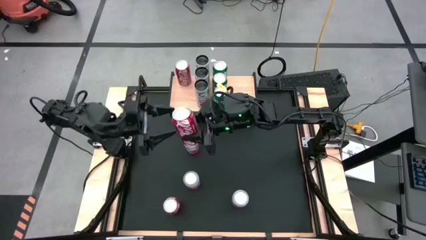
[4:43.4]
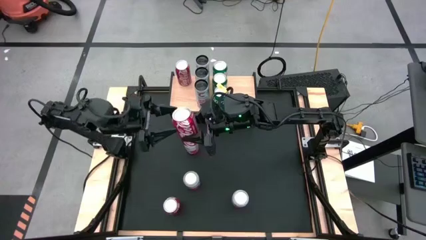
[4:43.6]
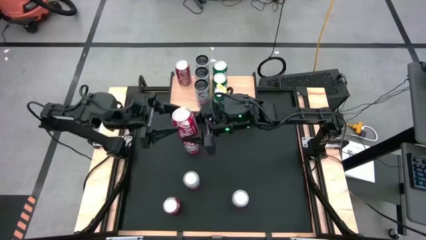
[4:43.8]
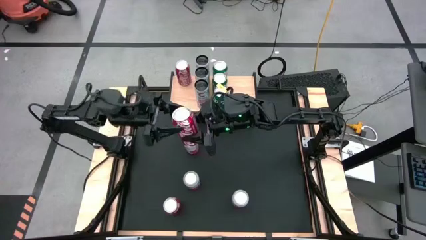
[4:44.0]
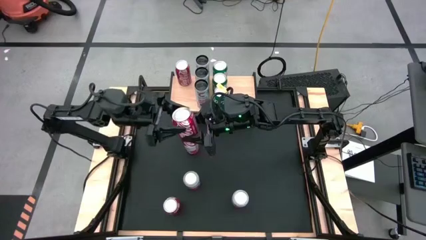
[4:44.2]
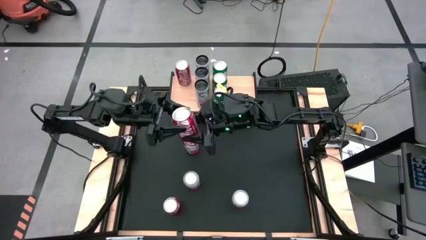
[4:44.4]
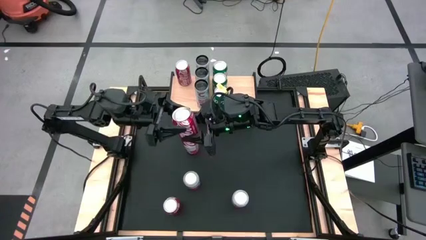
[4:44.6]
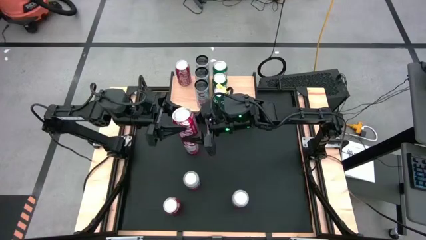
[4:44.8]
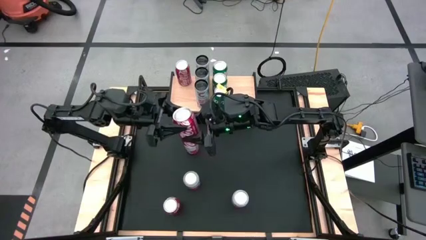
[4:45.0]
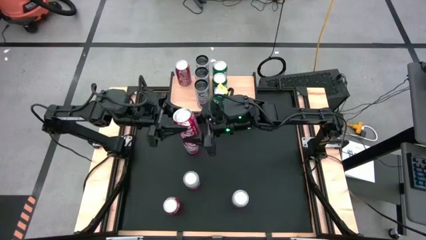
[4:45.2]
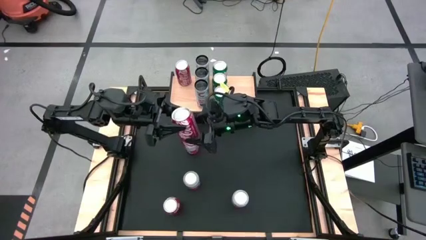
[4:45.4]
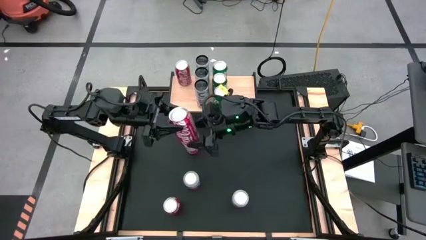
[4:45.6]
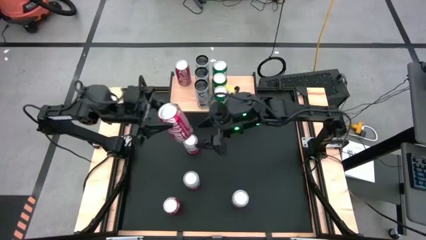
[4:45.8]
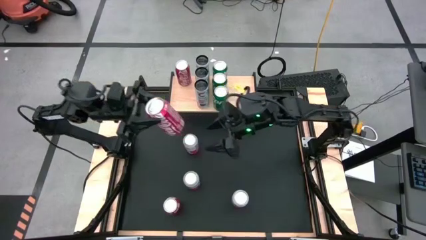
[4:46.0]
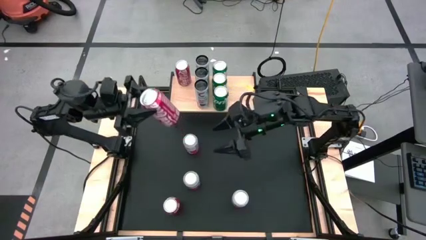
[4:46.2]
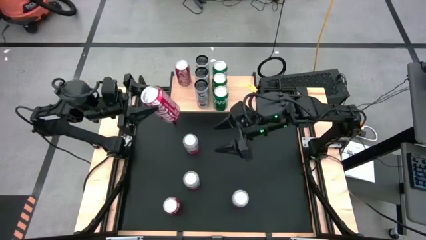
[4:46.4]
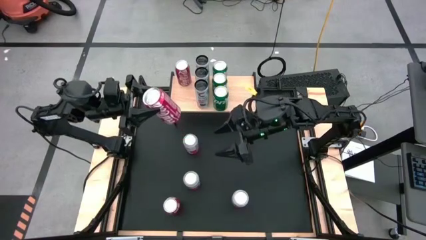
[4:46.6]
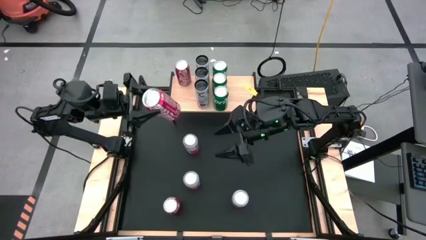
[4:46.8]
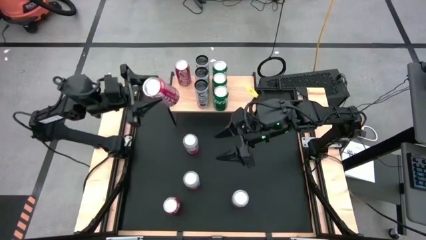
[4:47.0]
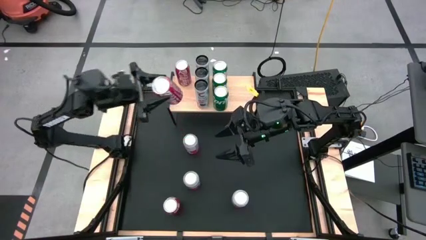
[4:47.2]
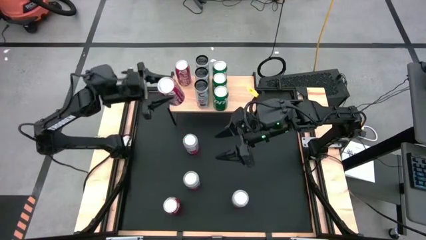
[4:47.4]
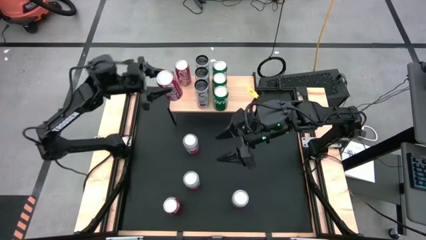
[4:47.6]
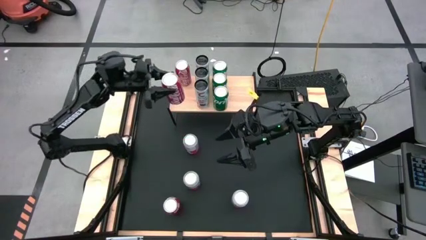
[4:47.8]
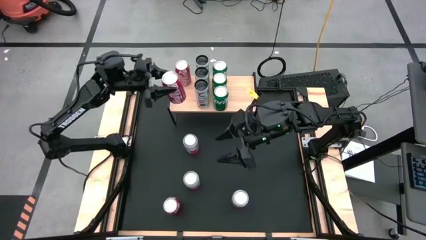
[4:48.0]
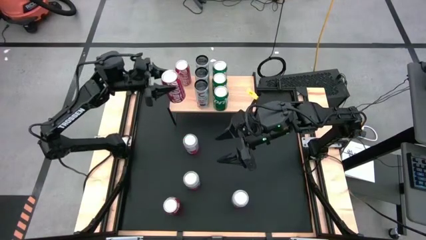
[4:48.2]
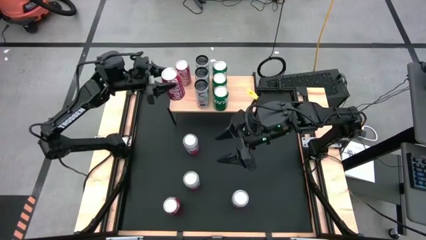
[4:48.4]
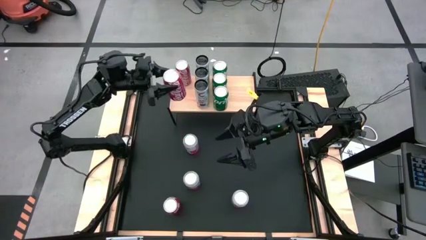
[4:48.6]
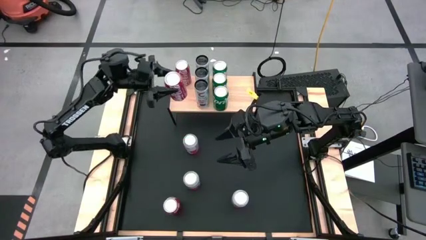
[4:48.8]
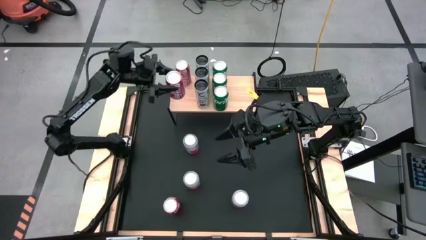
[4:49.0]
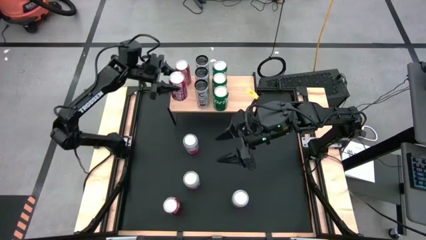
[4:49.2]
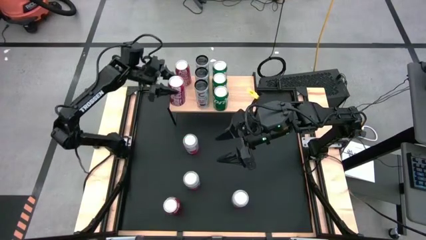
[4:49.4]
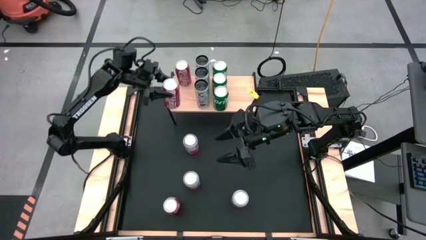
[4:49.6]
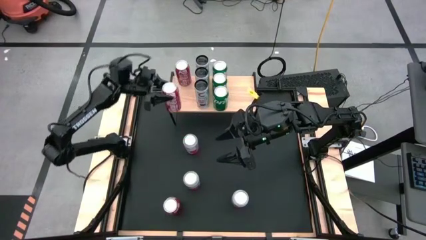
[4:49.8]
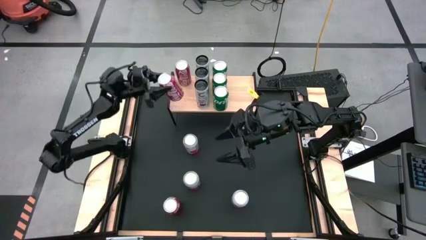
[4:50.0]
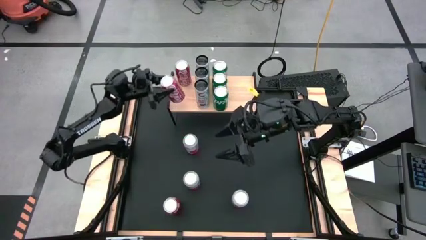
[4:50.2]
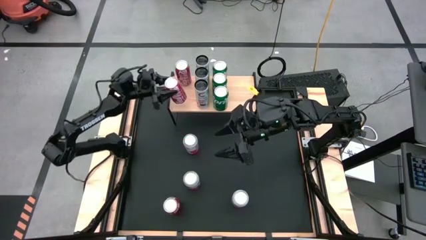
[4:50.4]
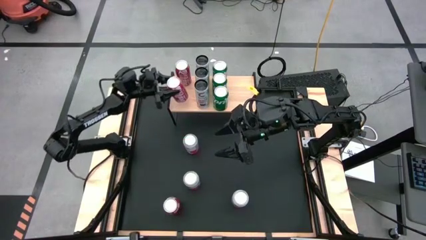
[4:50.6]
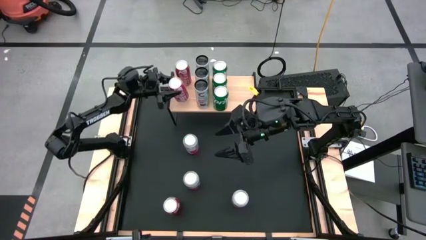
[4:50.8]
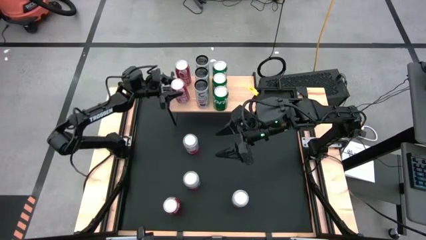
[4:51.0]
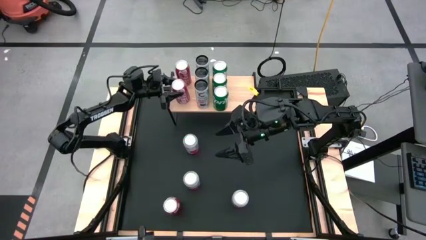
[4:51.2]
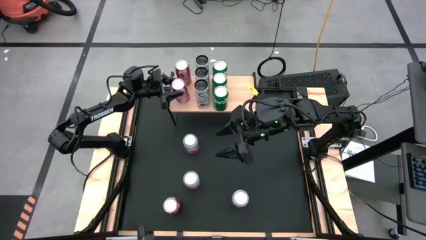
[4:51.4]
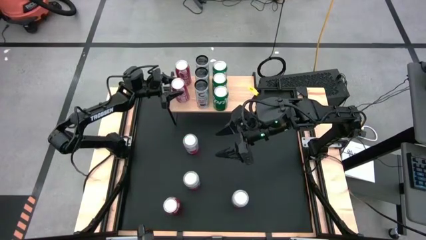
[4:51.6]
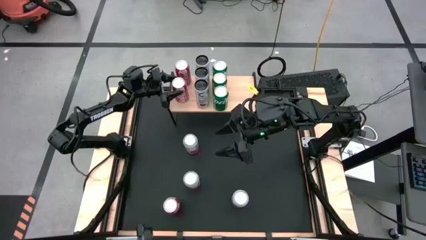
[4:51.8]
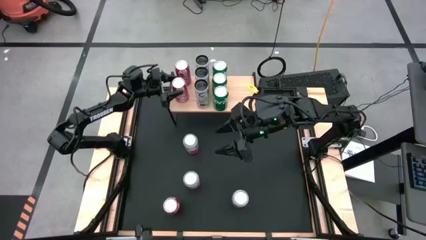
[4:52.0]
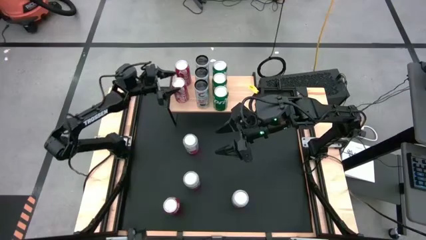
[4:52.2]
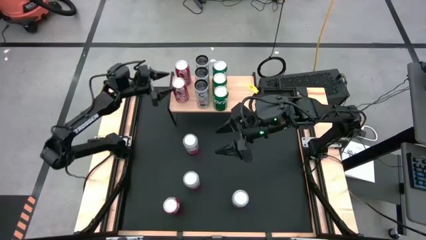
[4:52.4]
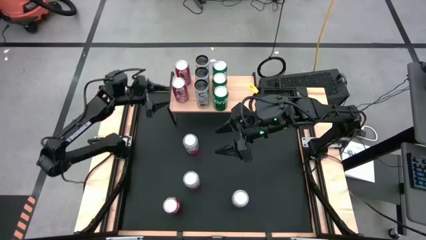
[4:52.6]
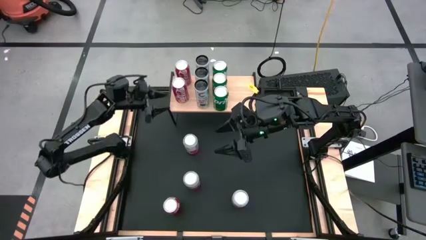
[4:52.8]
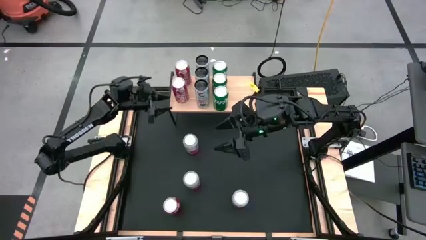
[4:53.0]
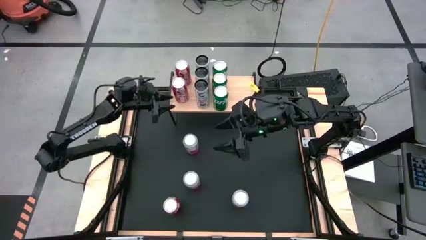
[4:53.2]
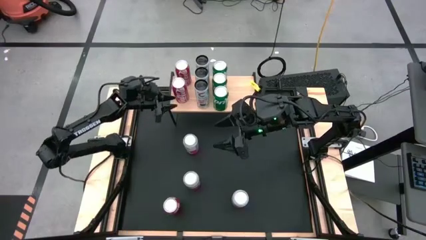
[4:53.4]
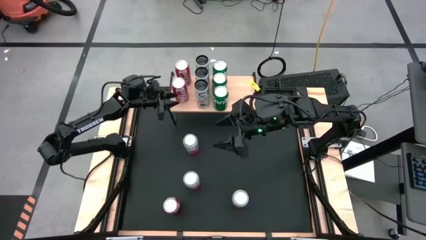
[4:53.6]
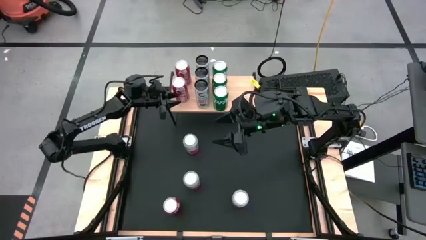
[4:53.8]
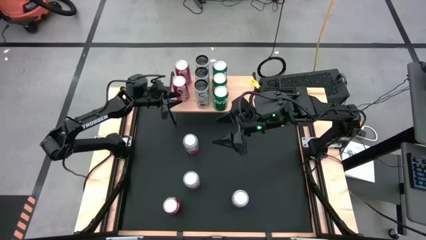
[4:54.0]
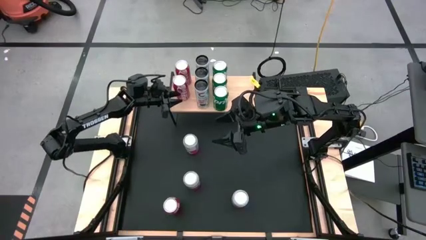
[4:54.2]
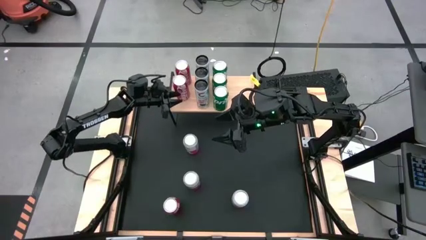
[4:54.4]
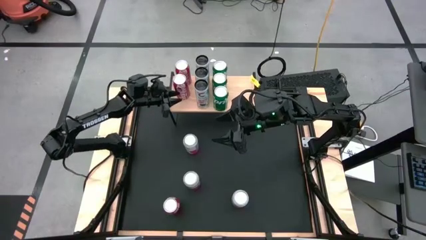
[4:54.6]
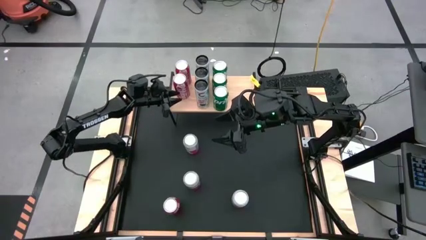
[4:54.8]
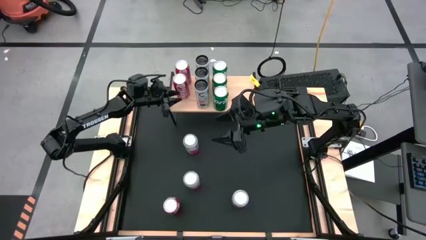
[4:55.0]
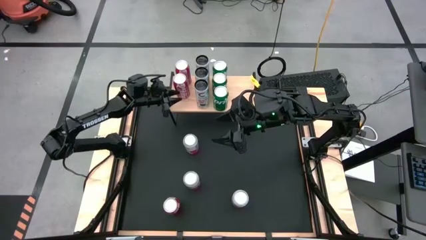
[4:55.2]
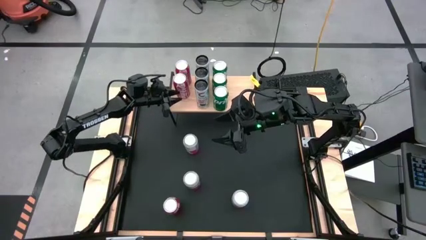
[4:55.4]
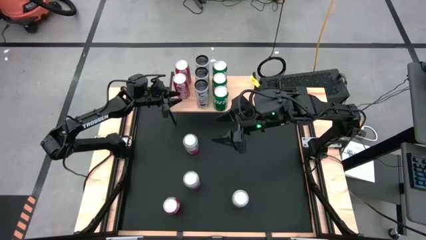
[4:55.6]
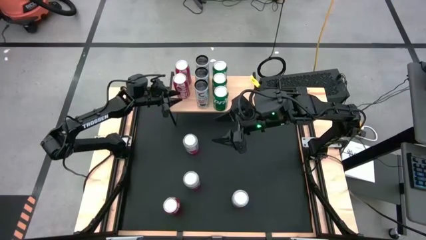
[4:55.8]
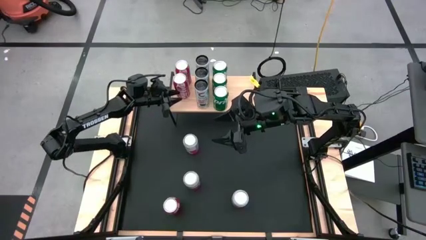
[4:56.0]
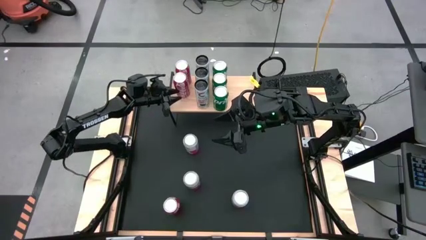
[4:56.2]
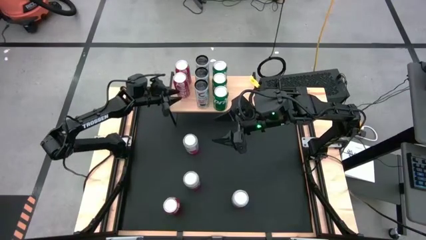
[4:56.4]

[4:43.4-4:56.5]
Task: Place canned beverage on shelf
Put the top red soda can aligned with the other red soda can on the shelf
